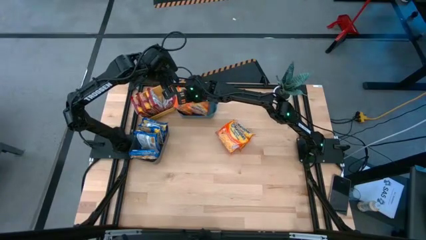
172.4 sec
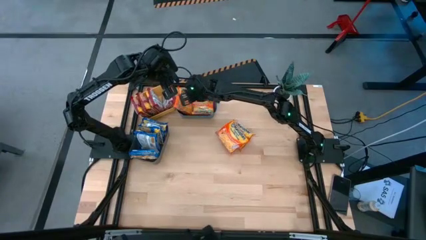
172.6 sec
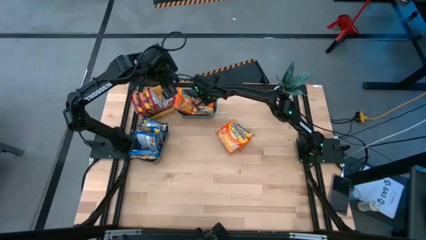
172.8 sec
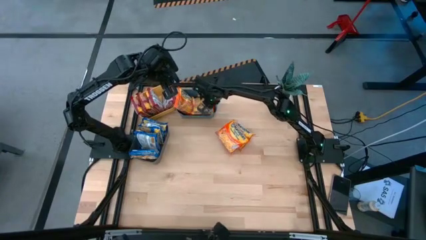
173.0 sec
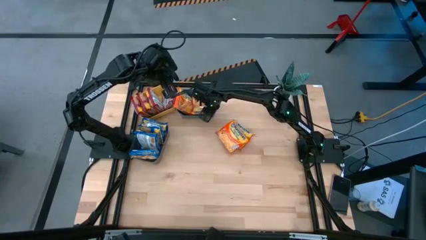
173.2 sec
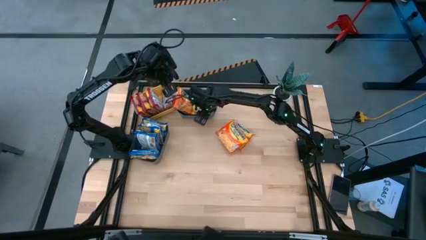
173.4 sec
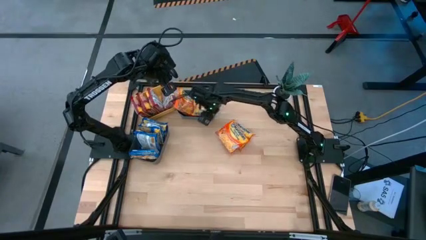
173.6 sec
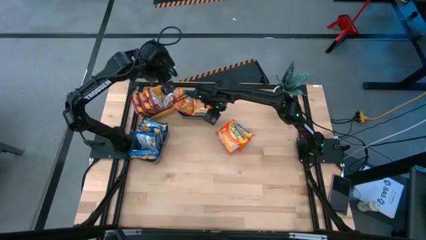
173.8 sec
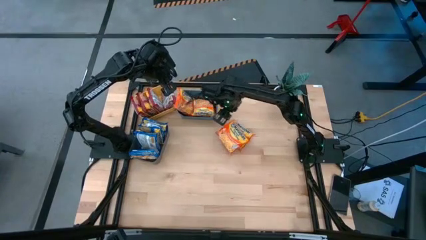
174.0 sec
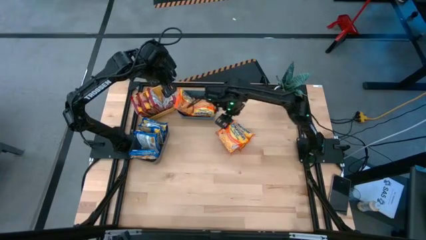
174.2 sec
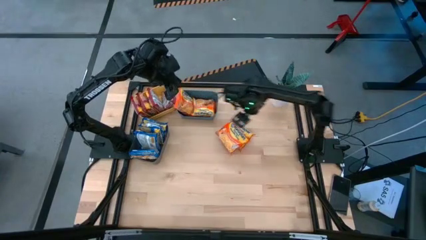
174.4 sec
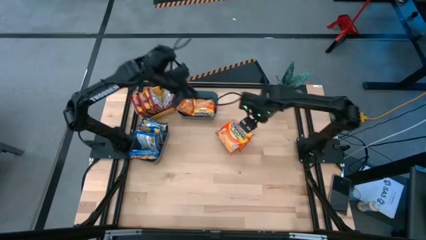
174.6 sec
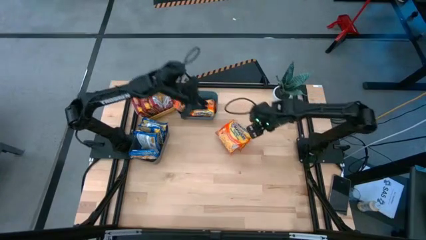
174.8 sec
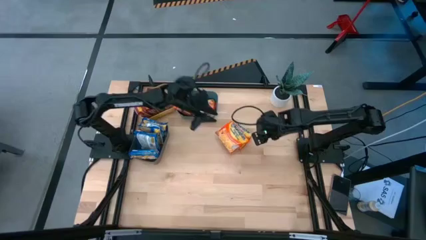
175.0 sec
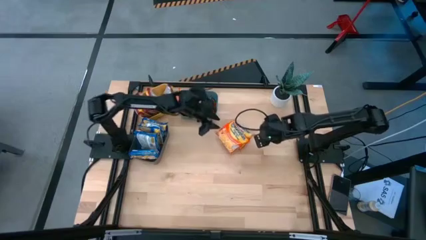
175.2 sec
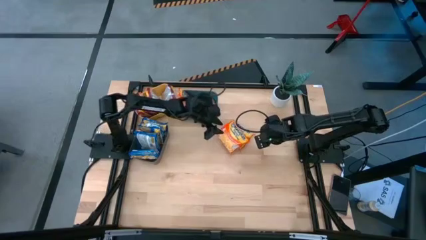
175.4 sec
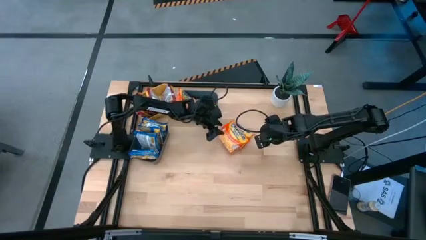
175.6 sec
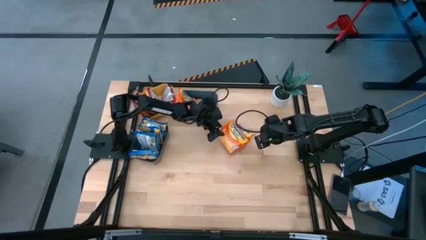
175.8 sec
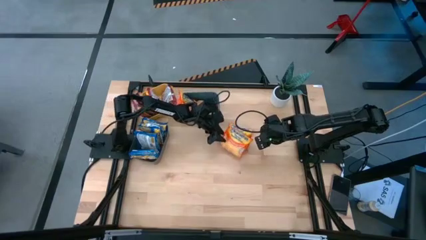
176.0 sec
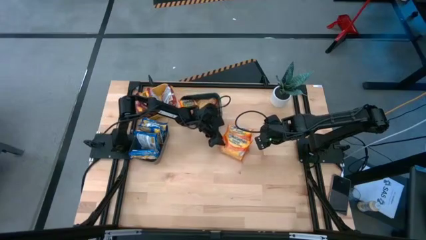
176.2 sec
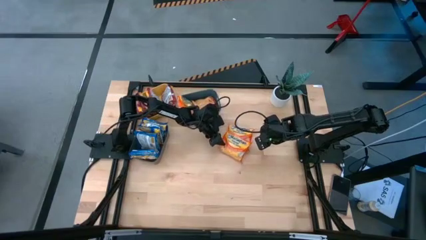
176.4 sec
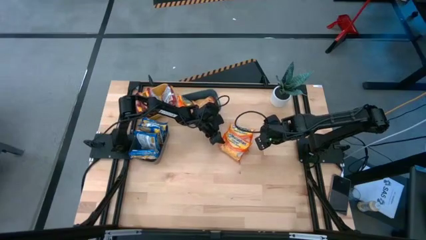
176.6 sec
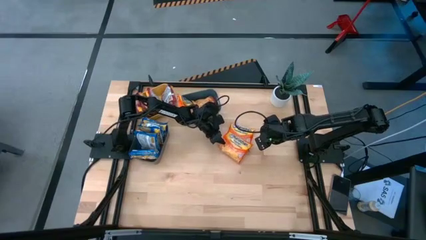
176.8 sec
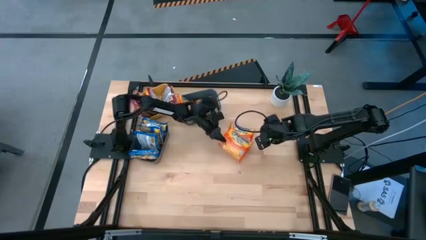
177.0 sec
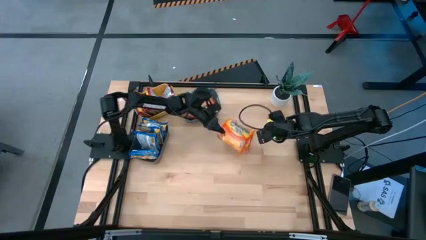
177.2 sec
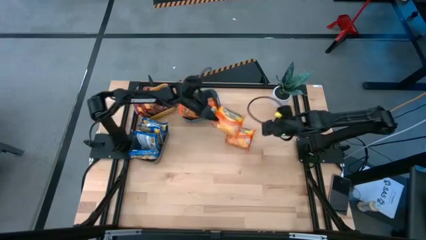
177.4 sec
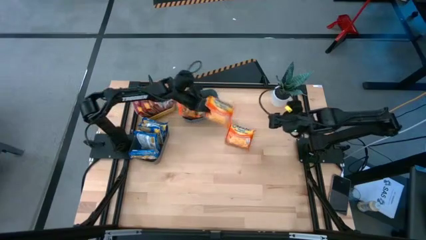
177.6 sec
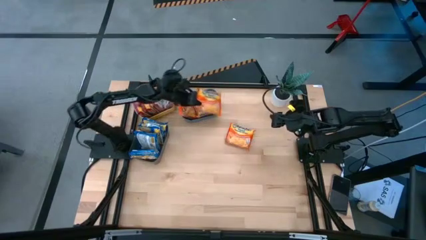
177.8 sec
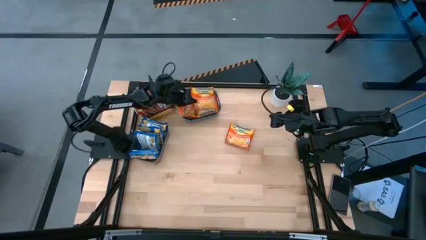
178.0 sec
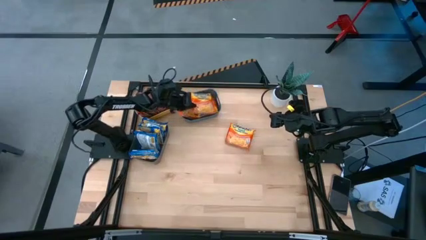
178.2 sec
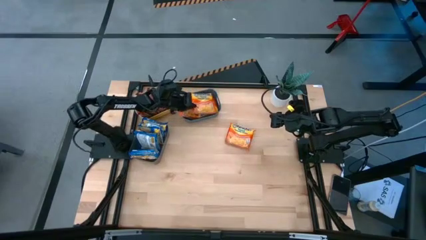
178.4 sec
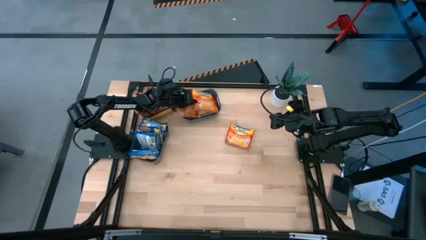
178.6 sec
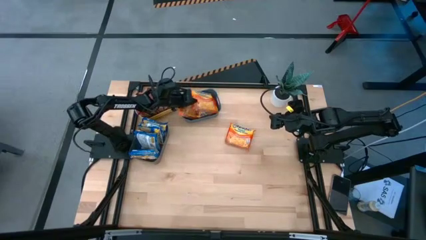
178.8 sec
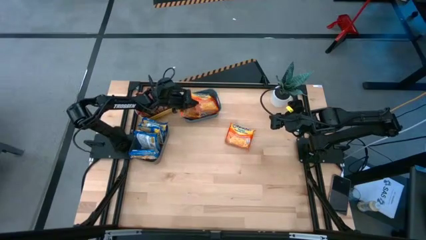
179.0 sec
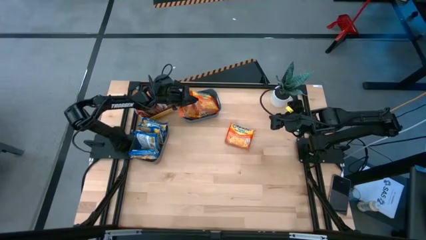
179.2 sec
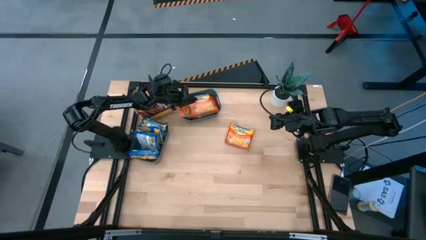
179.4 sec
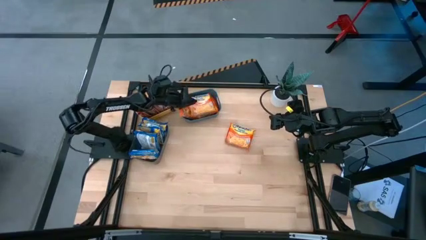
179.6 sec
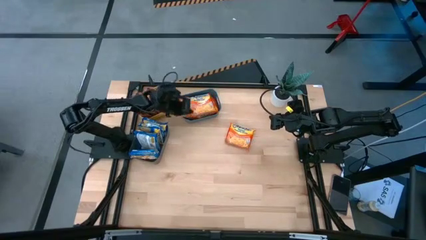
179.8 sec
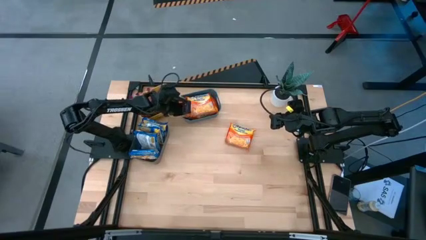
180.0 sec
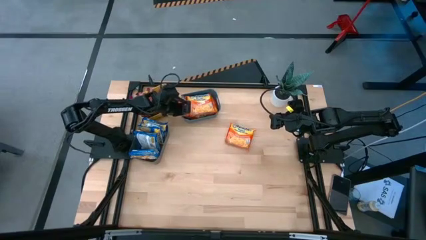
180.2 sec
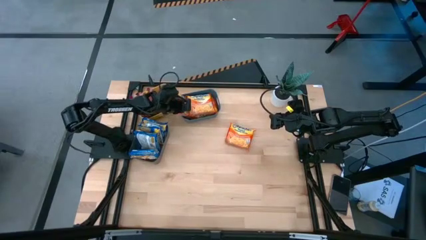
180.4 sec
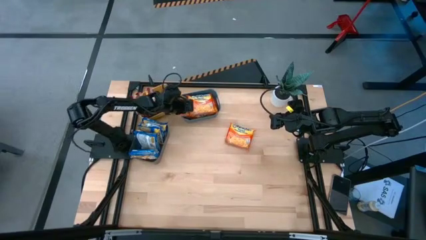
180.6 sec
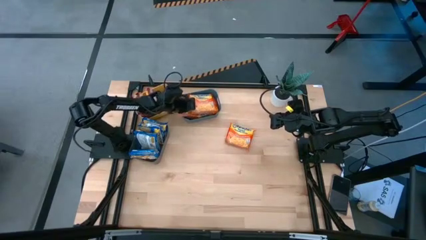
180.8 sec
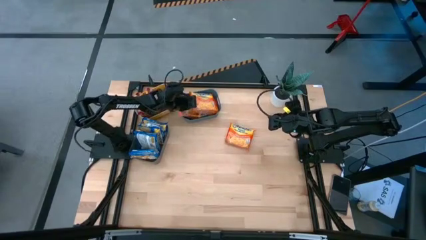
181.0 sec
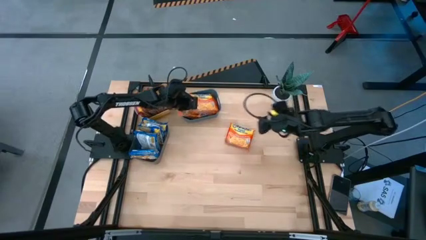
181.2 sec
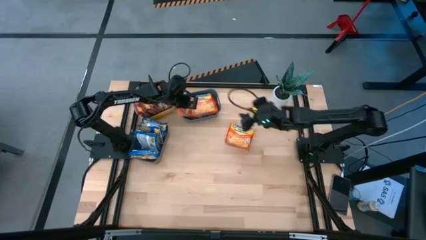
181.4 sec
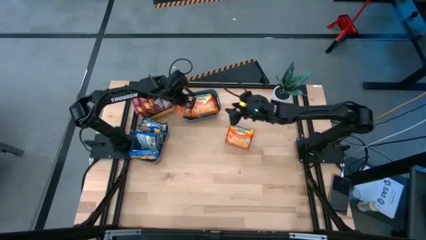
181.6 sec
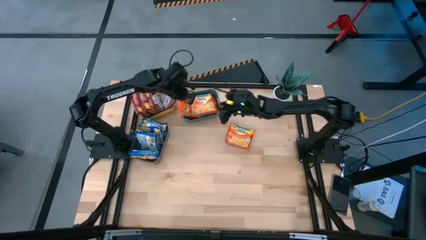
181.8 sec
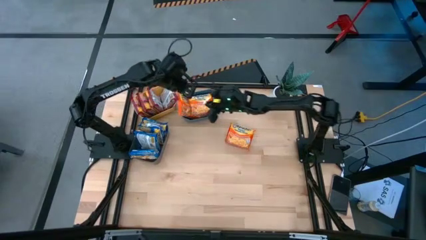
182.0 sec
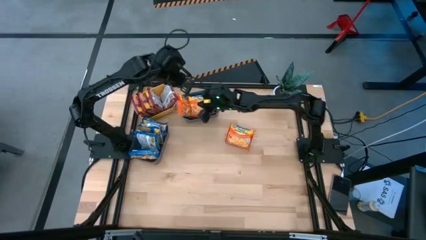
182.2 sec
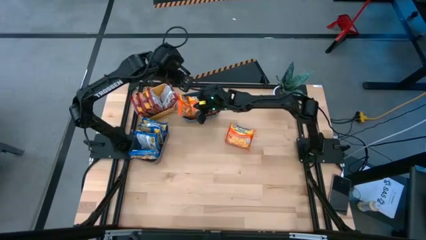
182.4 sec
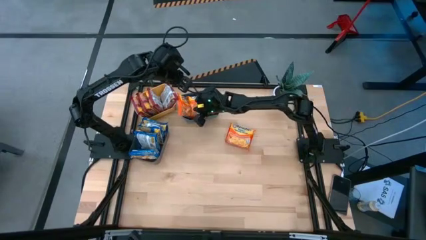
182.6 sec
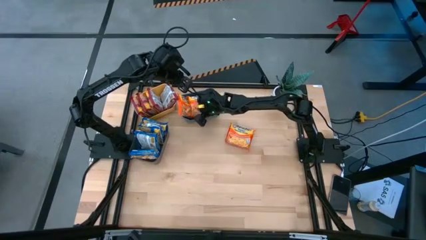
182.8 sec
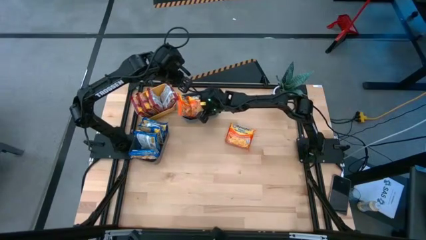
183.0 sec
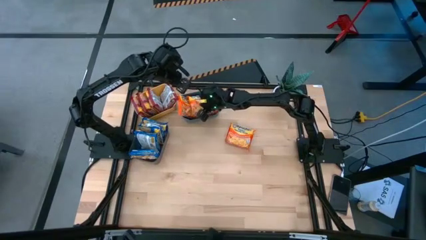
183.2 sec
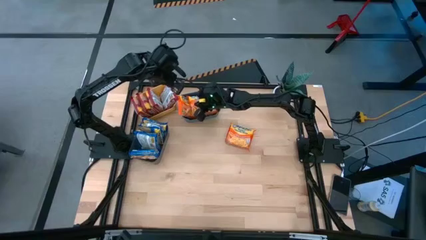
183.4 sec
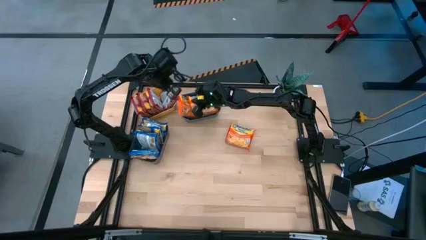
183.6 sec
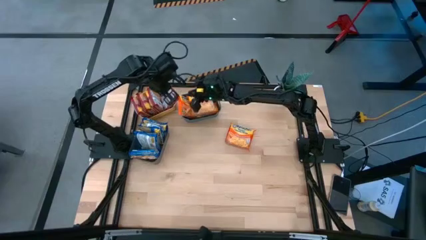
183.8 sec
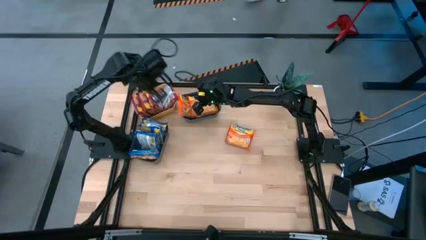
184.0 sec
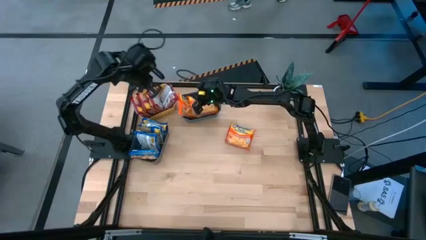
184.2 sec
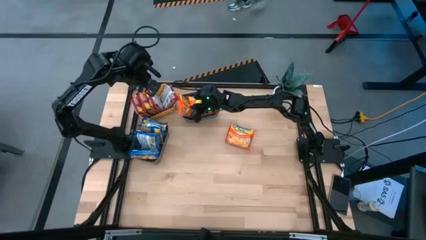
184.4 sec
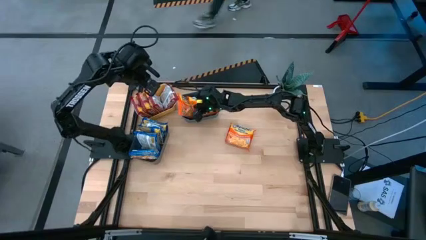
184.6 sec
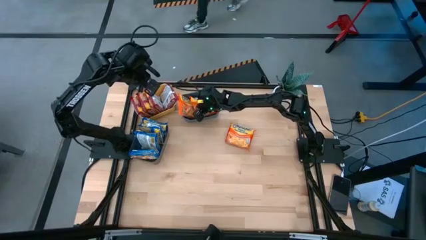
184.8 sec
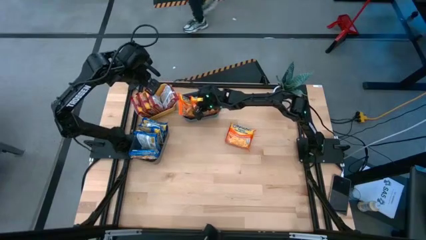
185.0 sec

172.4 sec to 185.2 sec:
Task: Sort Maruchan noodles
Put the orange noodle pack into the blue bin
